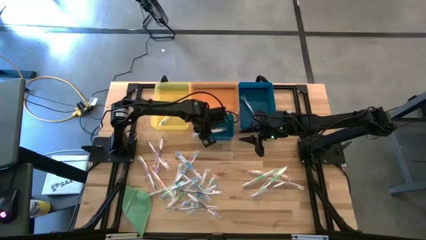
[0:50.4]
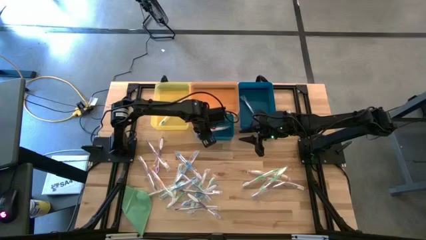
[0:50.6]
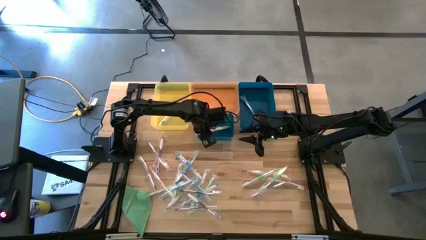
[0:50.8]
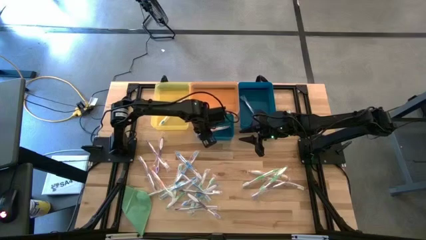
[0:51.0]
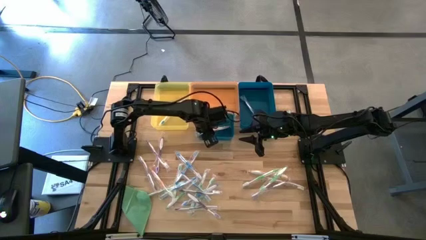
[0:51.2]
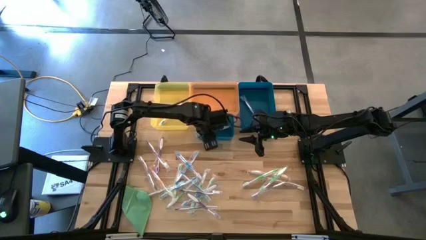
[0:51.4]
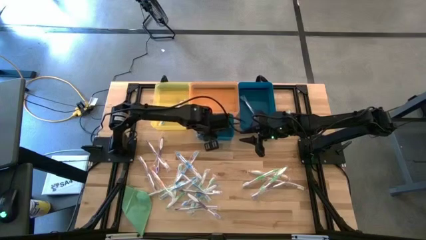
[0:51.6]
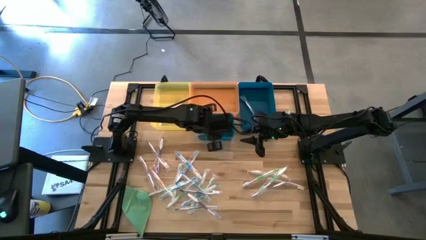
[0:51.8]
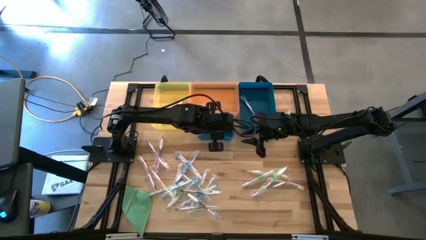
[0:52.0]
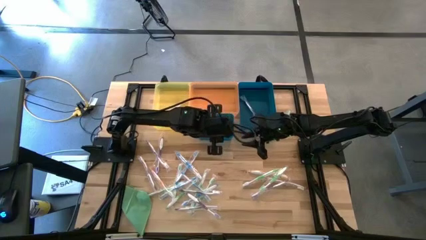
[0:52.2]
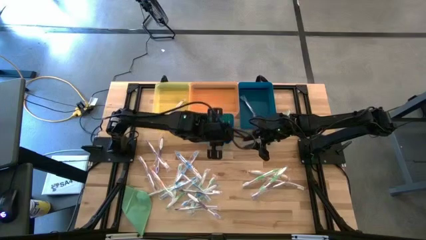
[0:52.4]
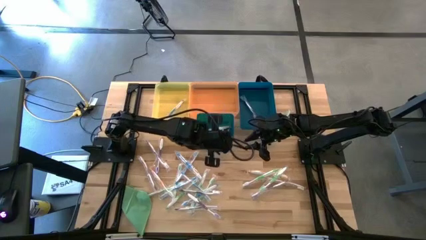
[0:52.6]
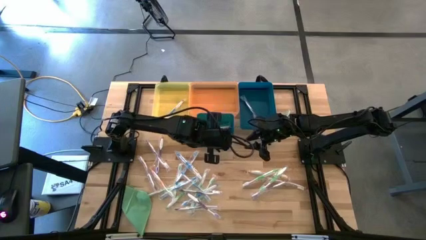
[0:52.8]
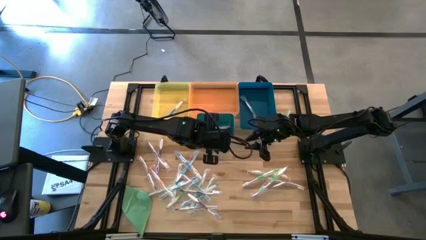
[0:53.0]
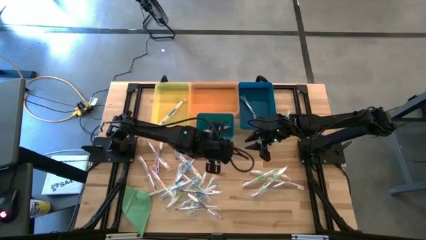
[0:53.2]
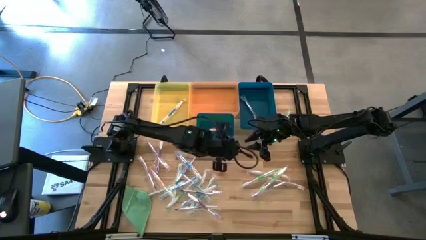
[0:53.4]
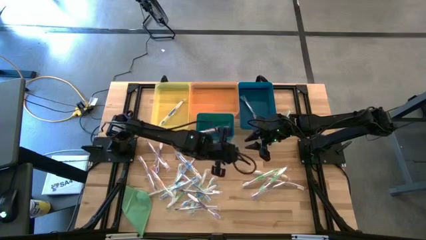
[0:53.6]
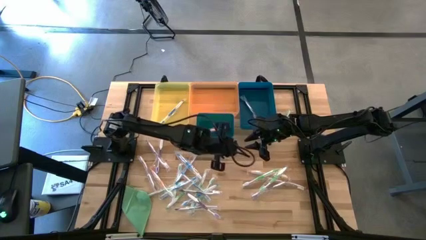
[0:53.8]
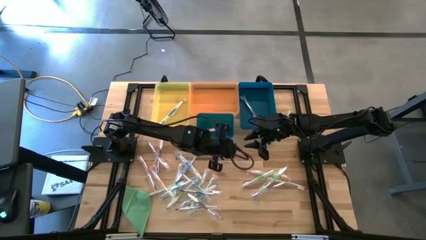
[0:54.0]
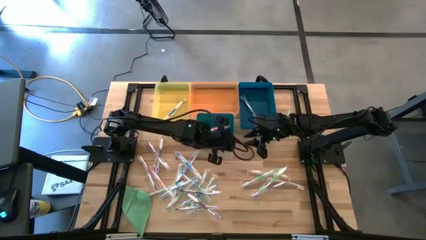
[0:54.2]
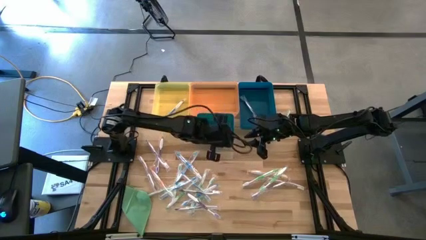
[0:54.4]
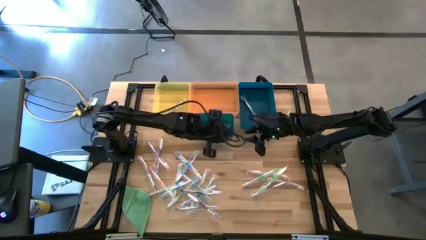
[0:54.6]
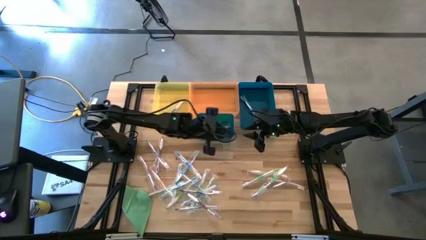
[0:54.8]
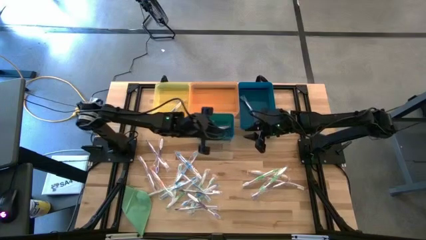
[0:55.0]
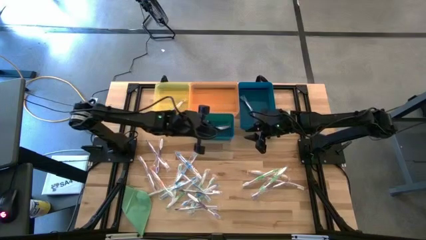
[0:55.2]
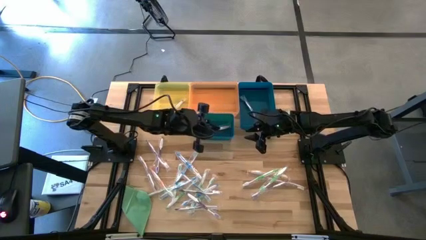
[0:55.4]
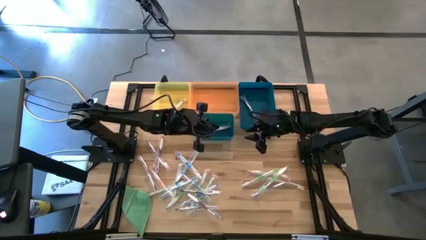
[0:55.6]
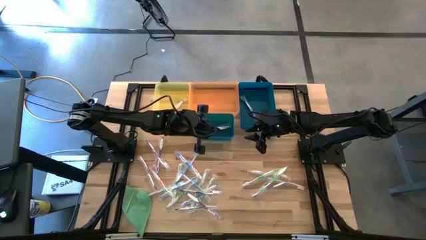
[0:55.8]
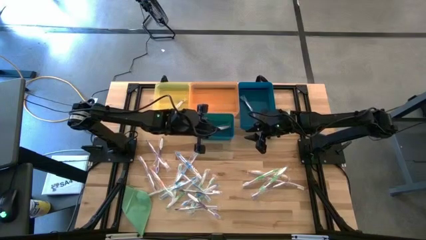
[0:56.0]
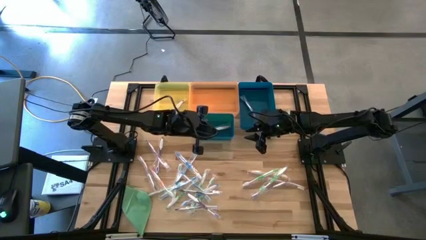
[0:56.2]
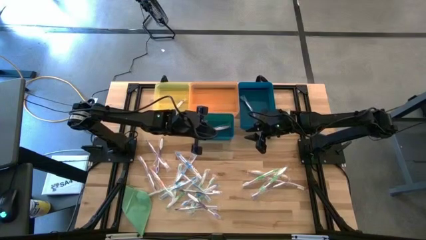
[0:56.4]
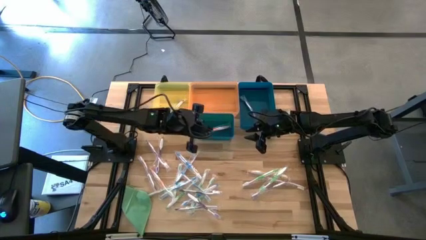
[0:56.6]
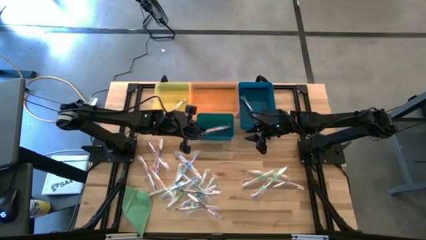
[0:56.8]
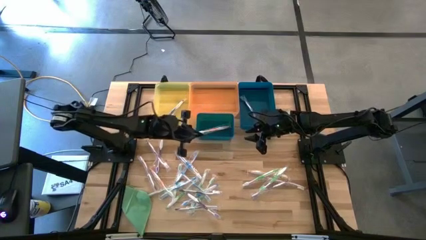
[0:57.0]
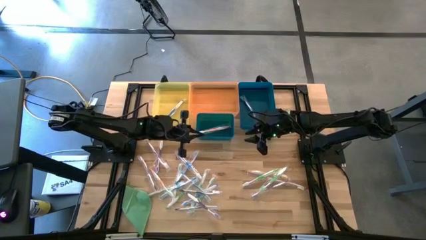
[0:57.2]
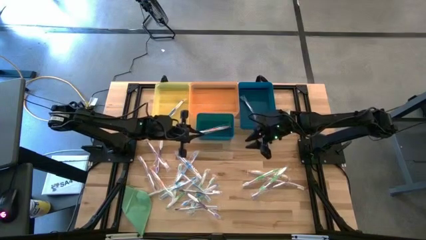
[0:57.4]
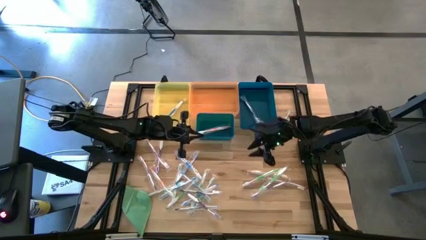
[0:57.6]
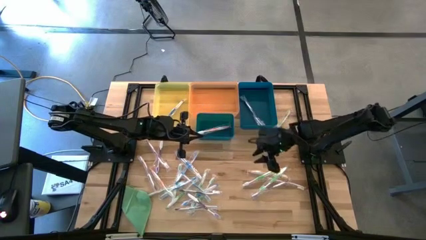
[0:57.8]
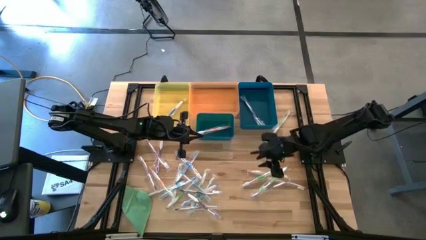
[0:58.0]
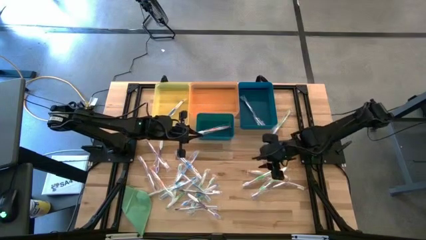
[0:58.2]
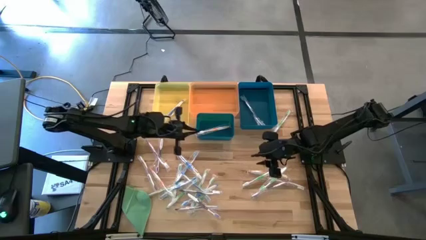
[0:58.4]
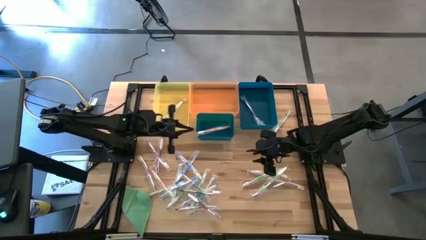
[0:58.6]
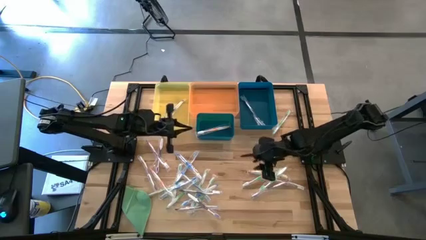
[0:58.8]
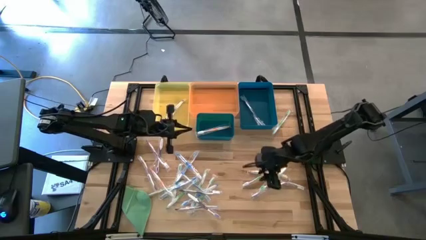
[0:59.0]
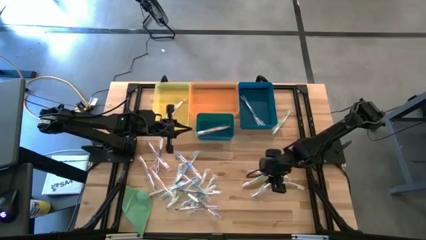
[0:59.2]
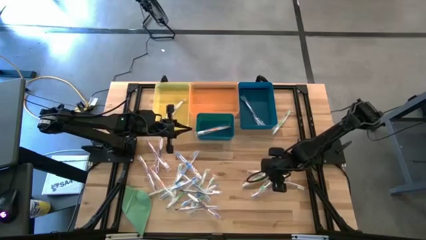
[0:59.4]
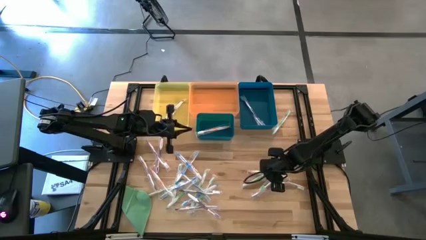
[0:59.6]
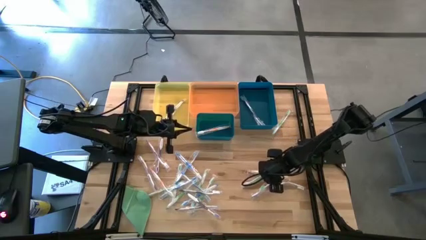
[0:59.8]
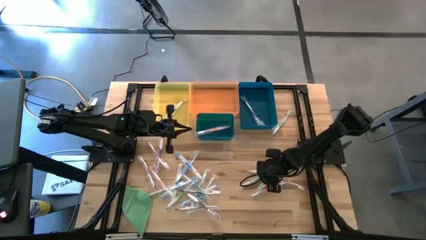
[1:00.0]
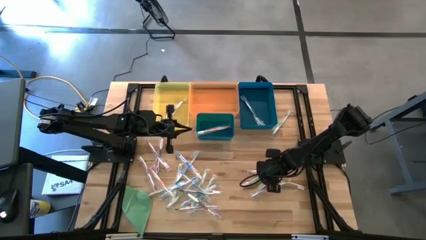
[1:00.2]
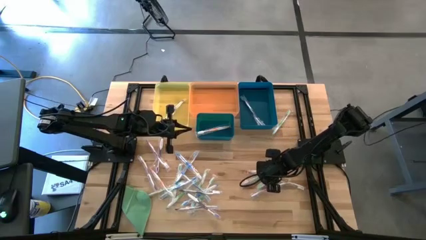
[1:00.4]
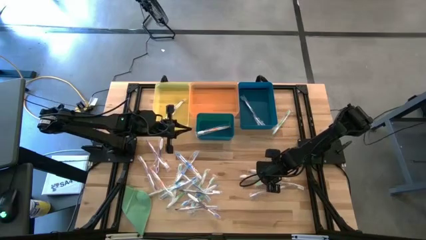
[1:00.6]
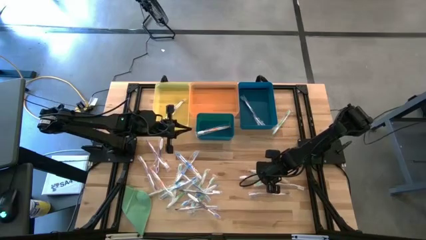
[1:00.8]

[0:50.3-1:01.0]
Task: Pick & Place Toothbrushes
Put the green toothbrush into the orange bin
